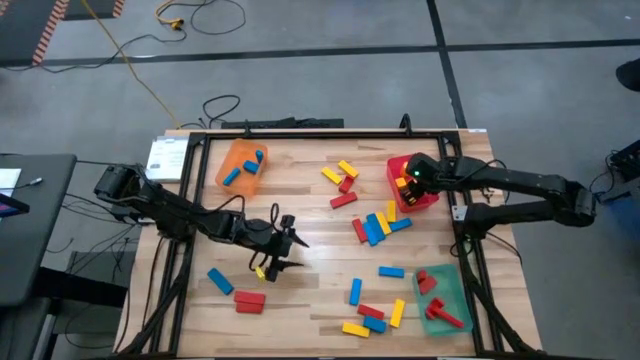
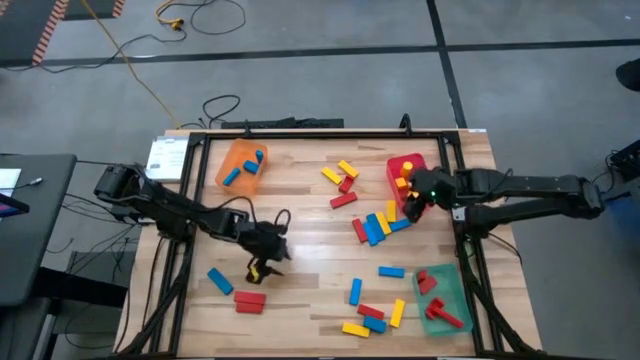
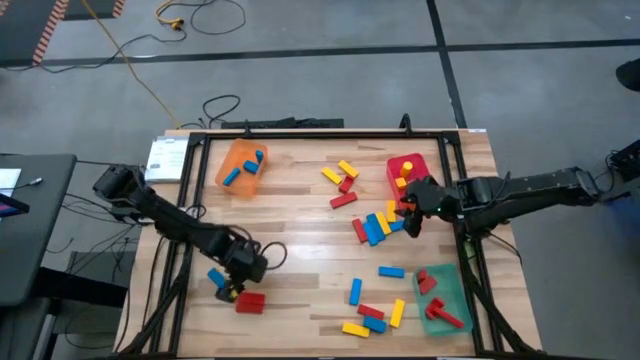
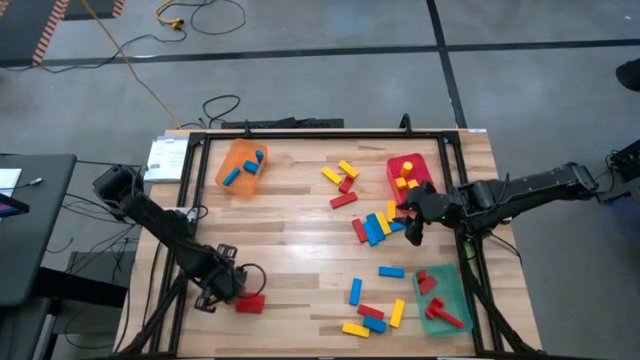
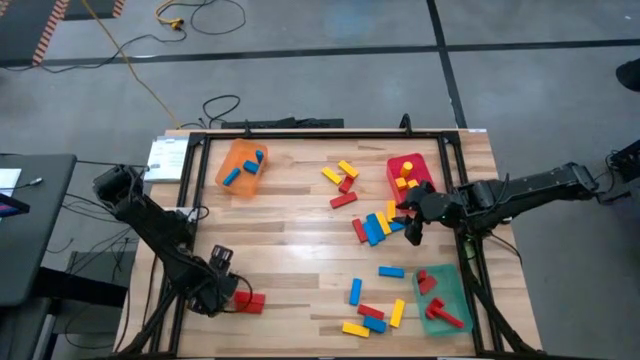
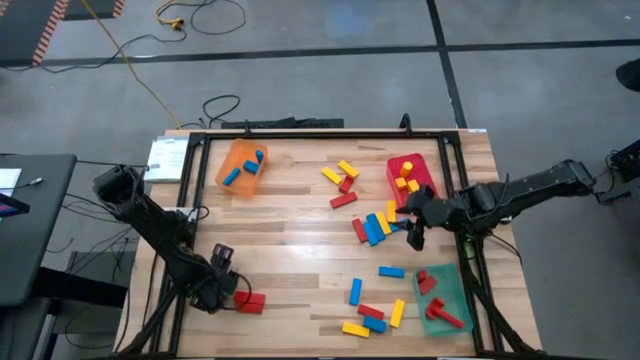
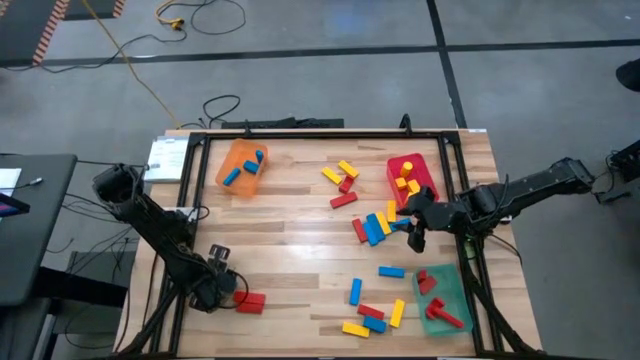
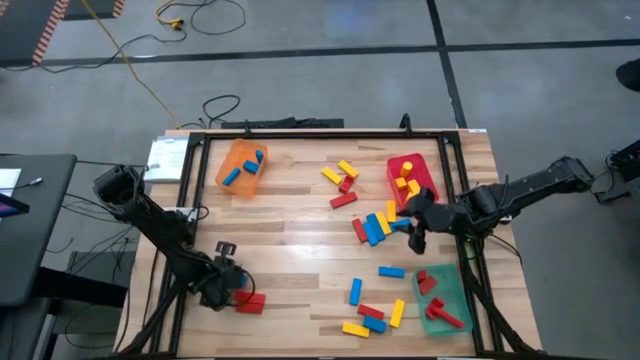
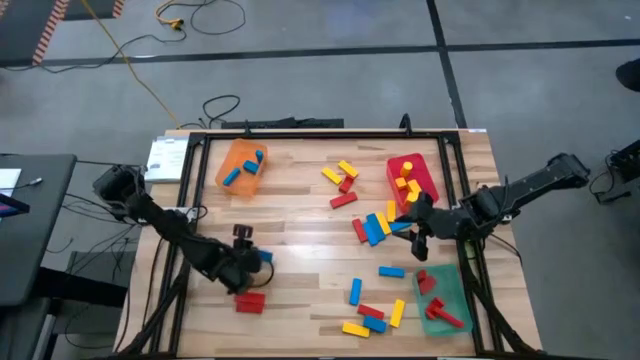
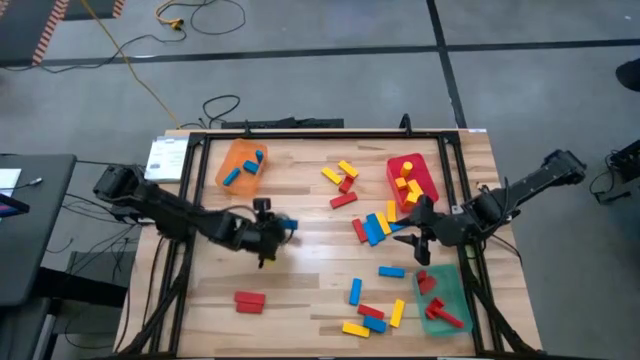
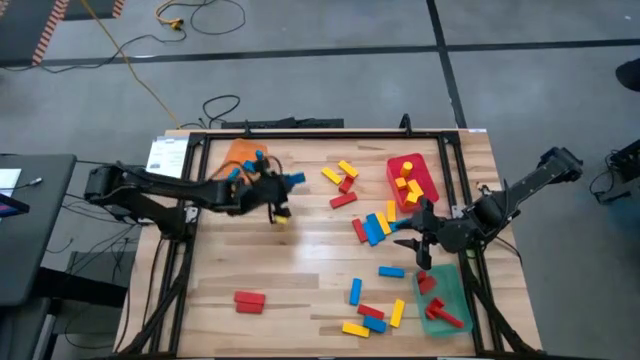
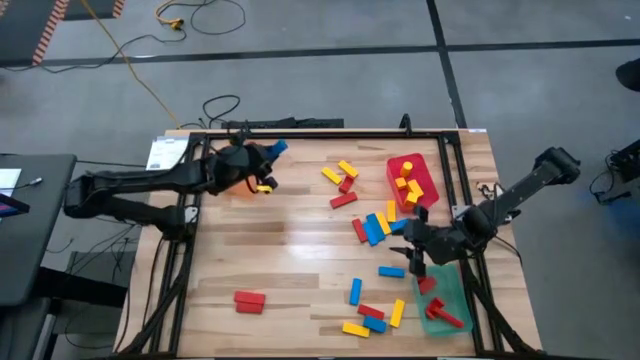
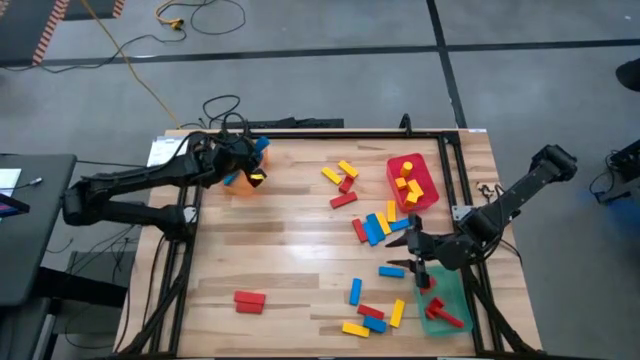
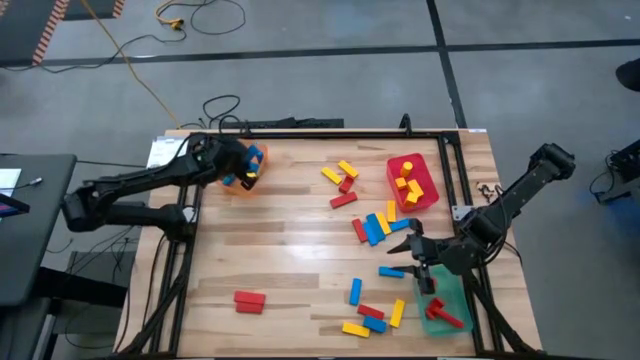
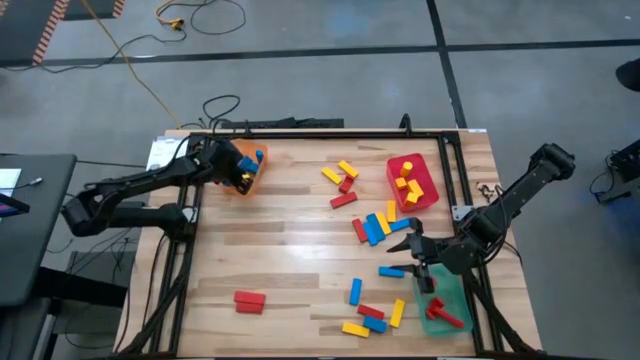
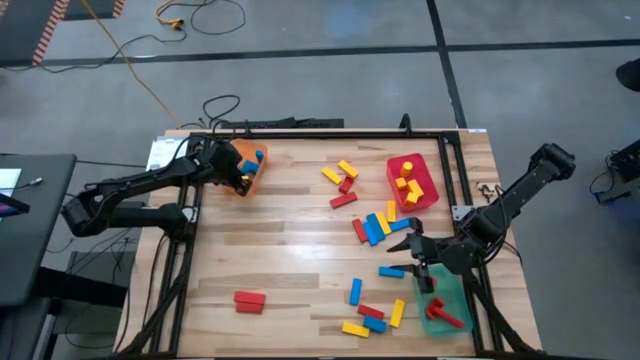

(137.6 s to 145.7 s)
Task: Sort blocks
Put the blue rectangle block into the orange bin

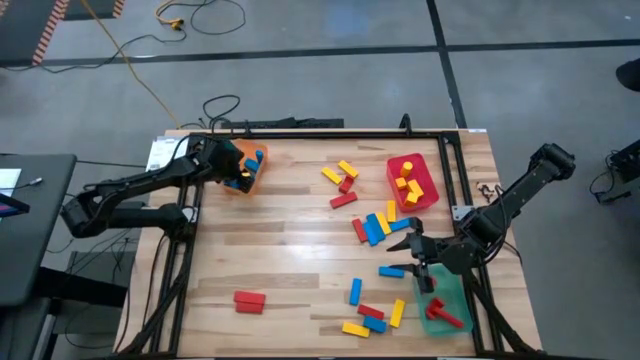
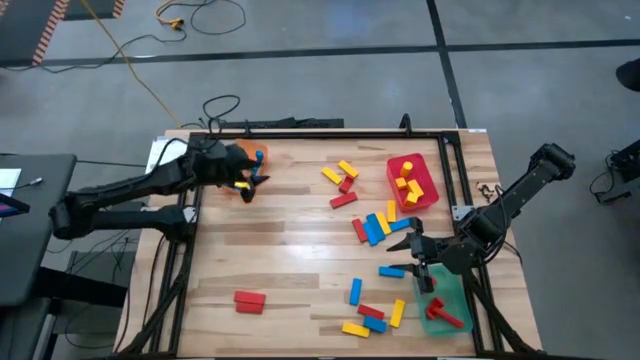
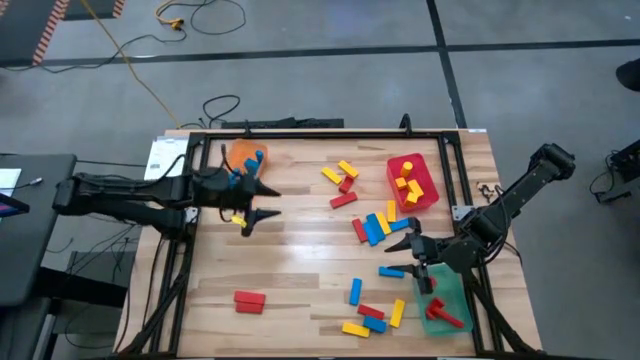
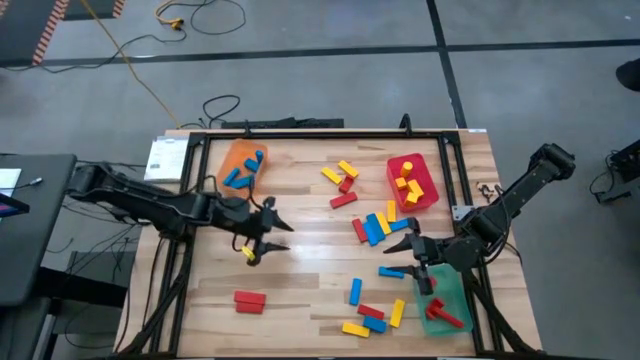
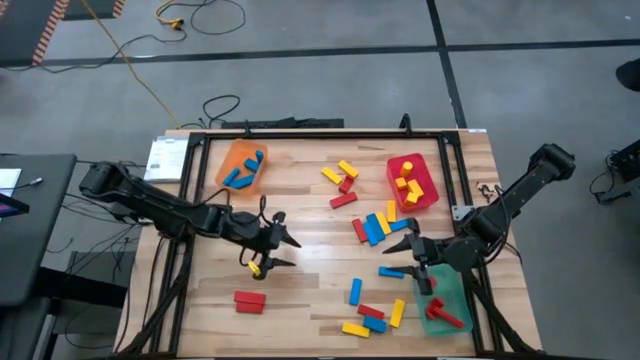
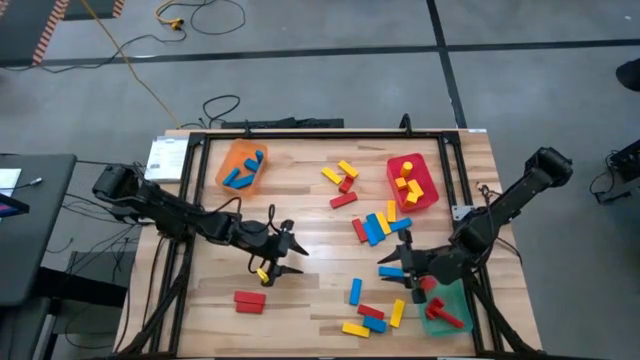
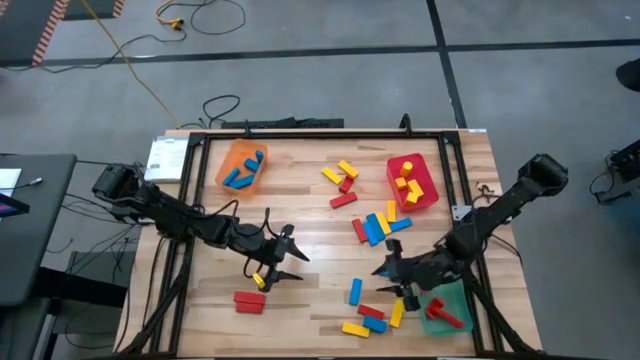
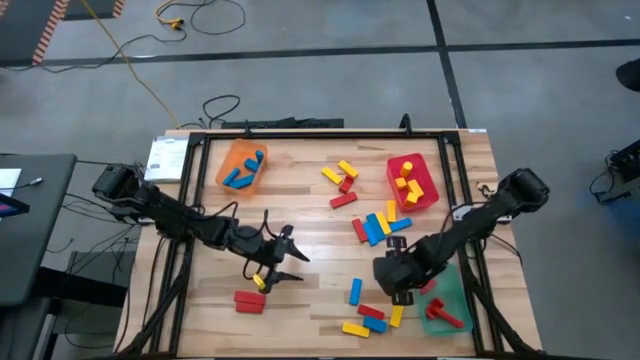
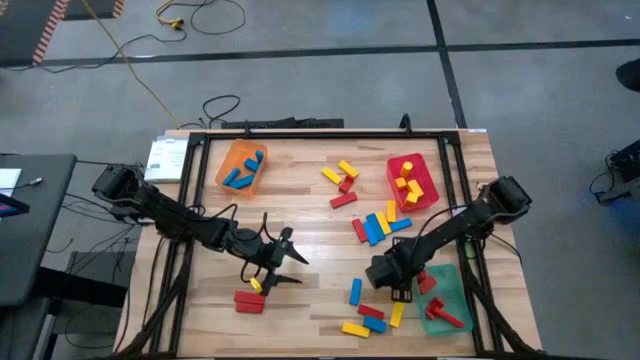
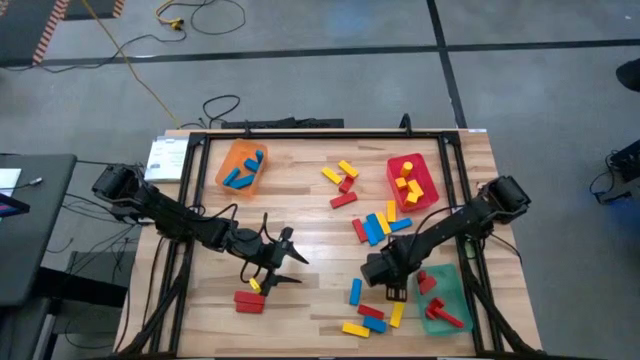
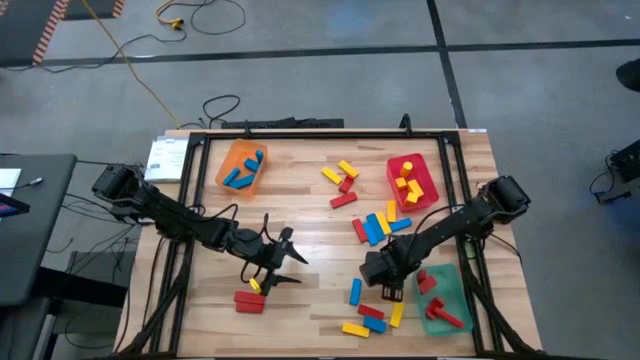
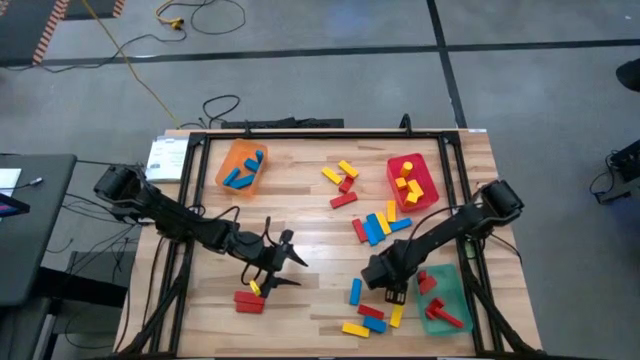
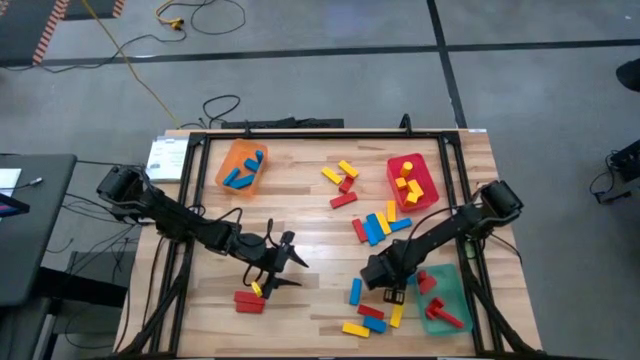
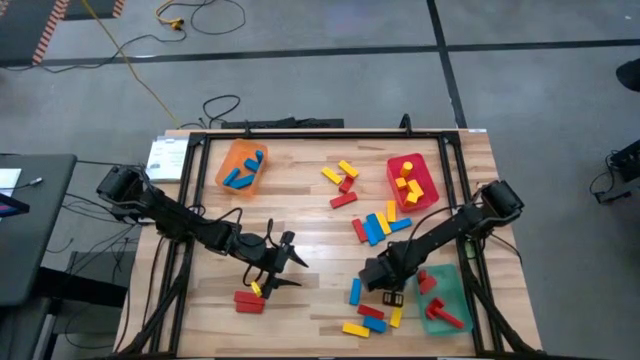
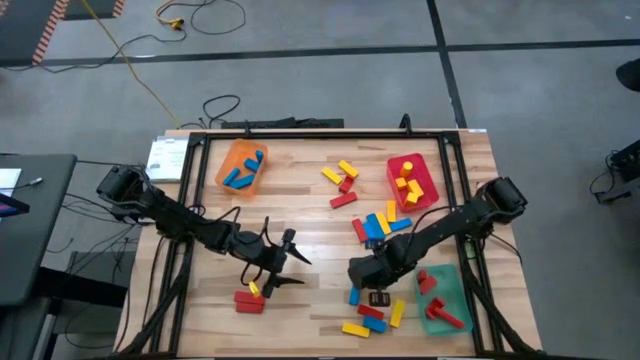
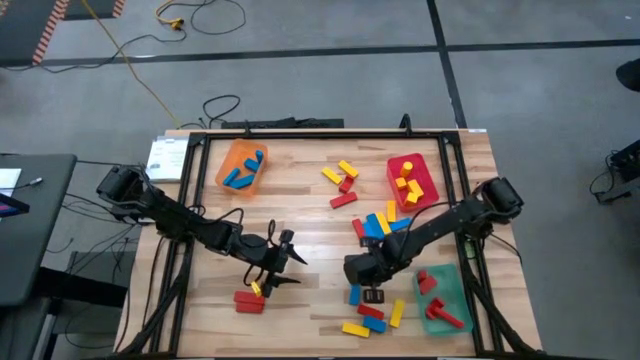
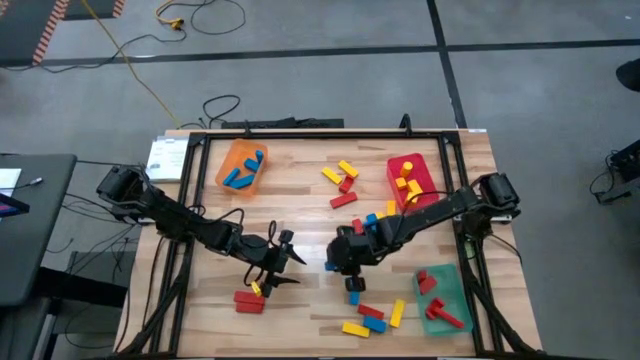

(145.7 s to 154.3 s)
Put the blue rectangle block into the orange bin

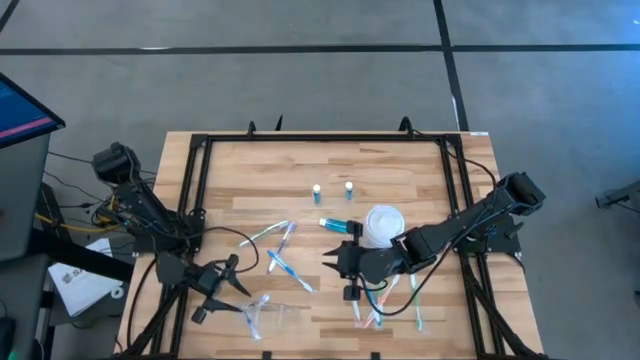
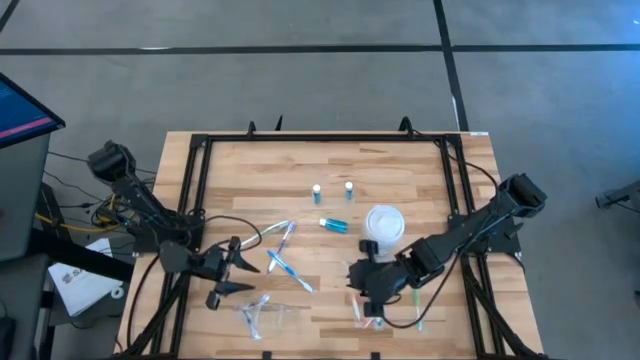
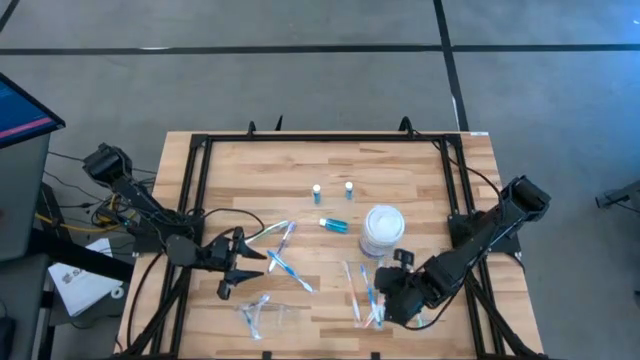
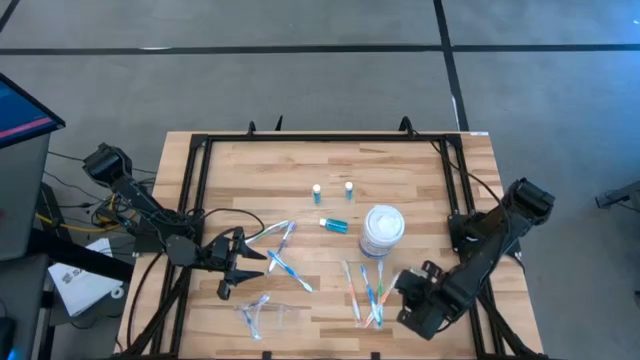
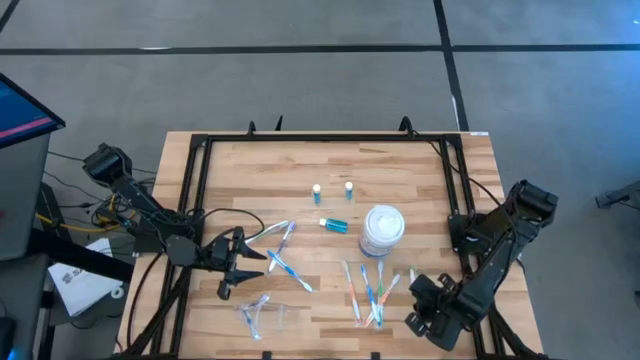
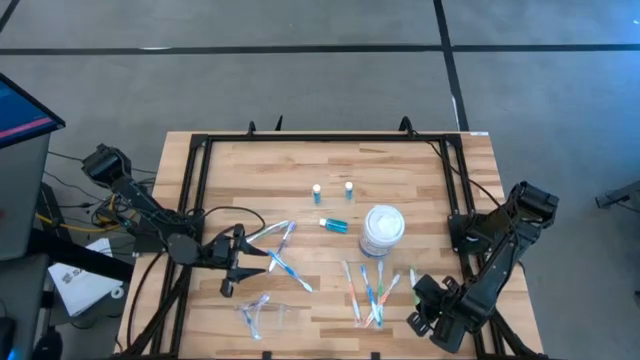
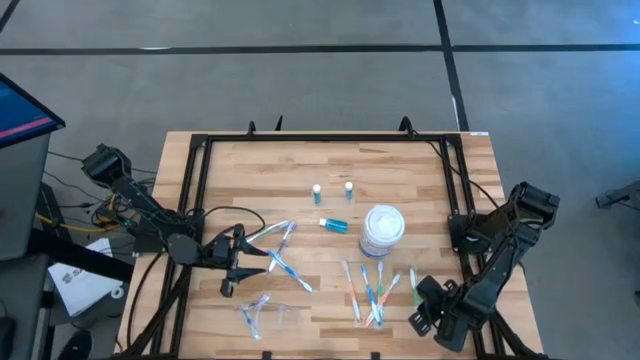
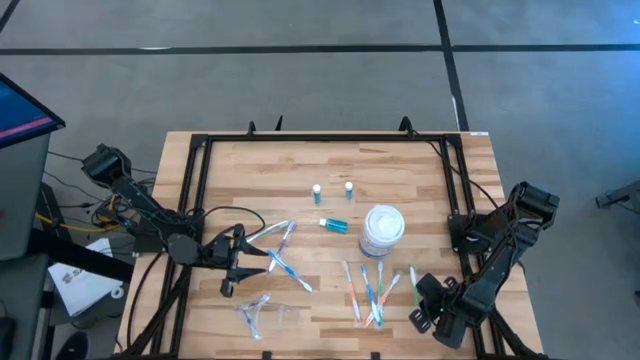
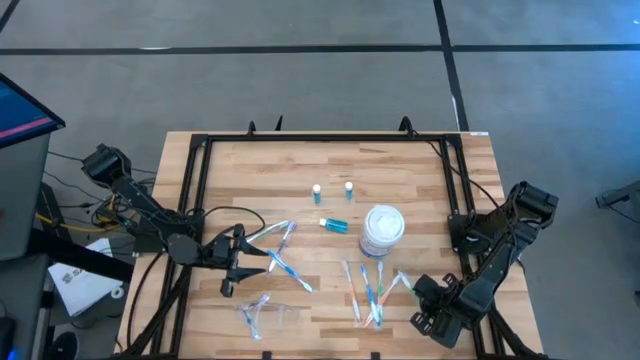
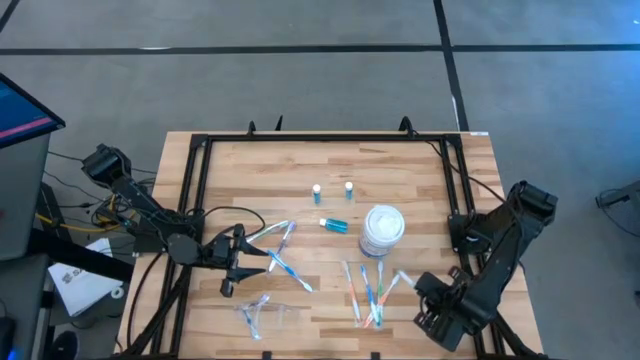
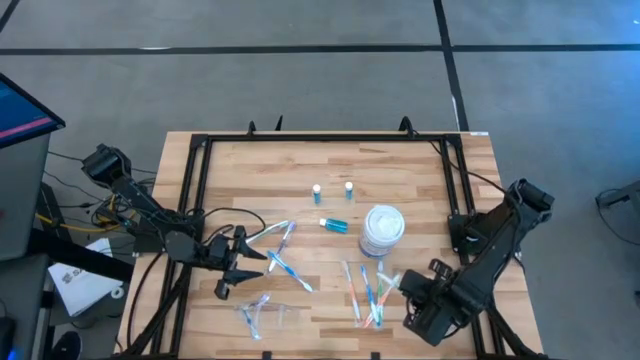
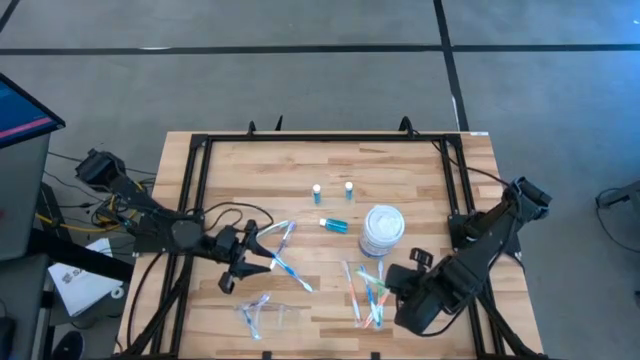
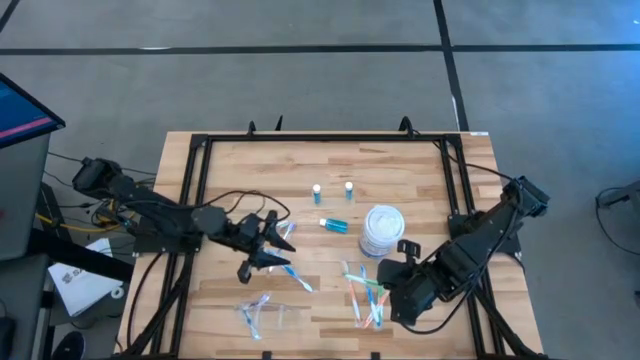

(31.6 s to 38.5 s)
Task: Pick & Place toothbrushing station
Put the right green toothbrush into the transparent organizer
